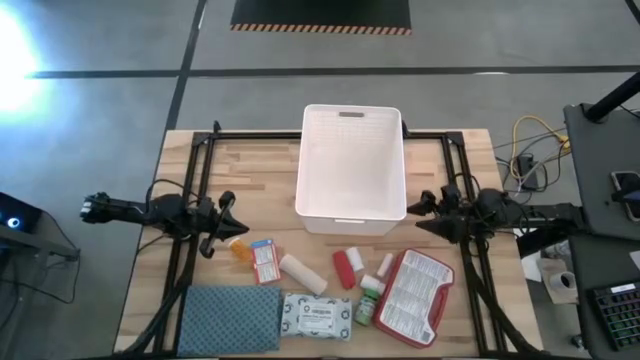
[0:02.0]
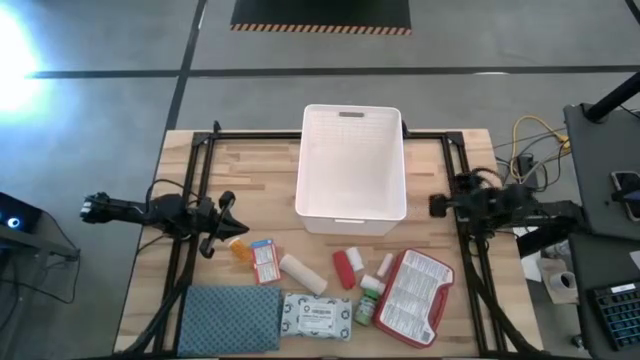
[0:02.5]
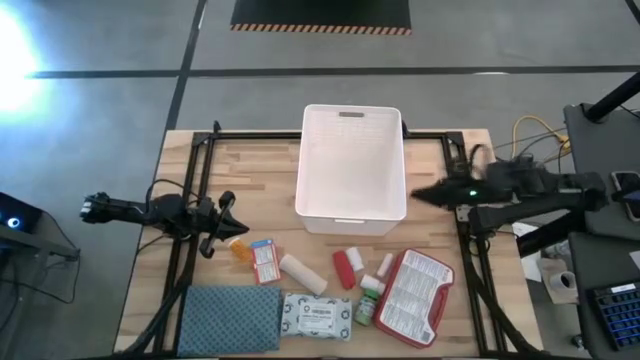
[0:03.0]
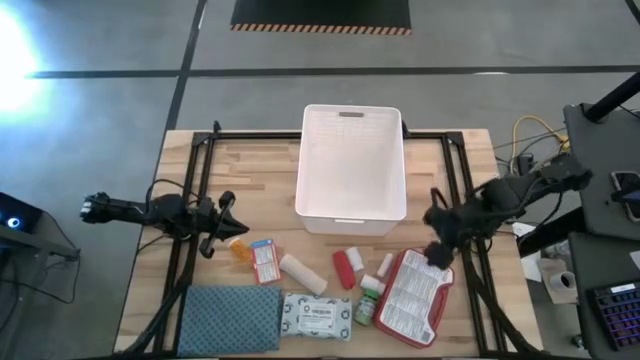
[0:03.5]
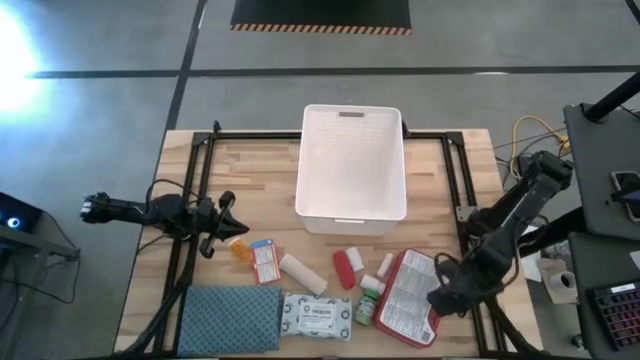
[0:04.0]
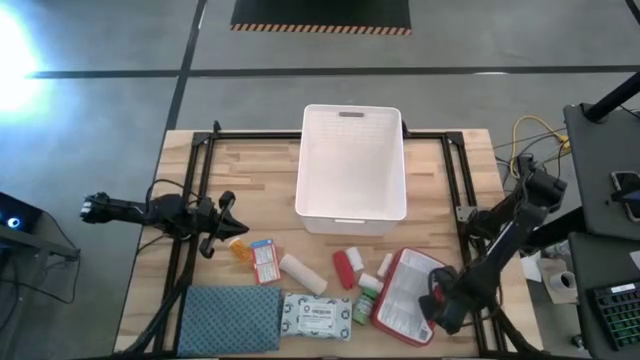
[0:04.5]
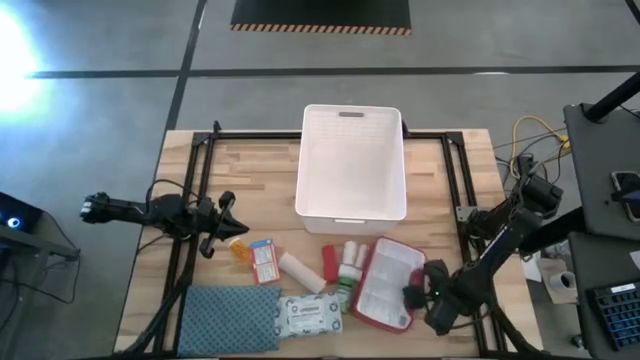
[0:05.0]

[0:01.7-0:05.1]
Task: Pick & place medical supplies in basket/bin
Put the red first aid kit into the white bin

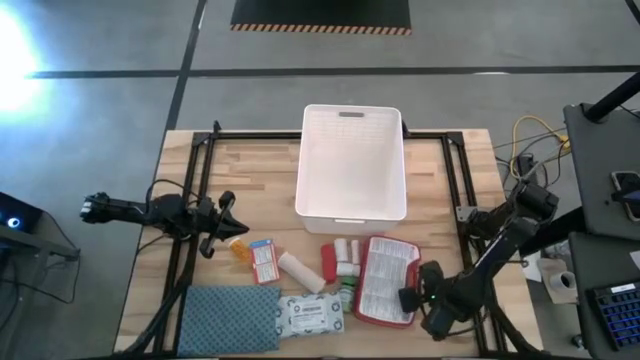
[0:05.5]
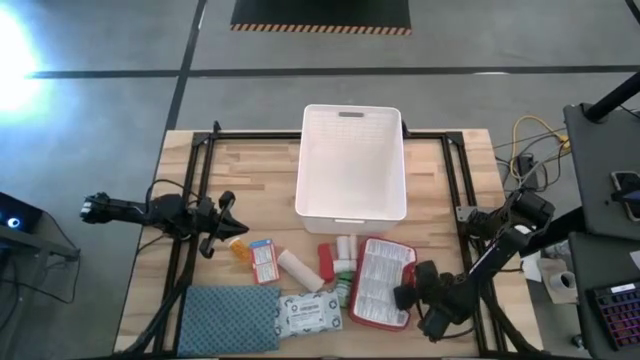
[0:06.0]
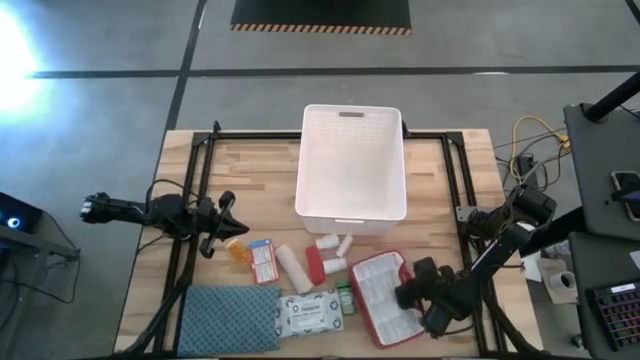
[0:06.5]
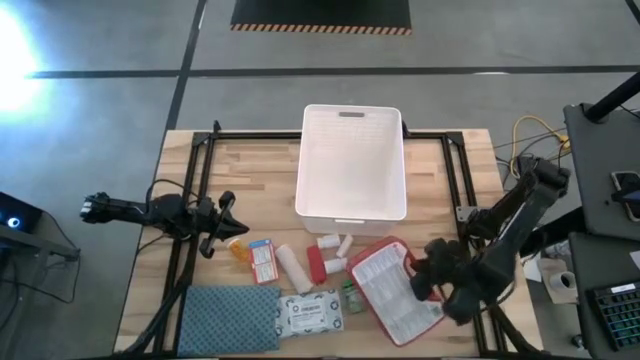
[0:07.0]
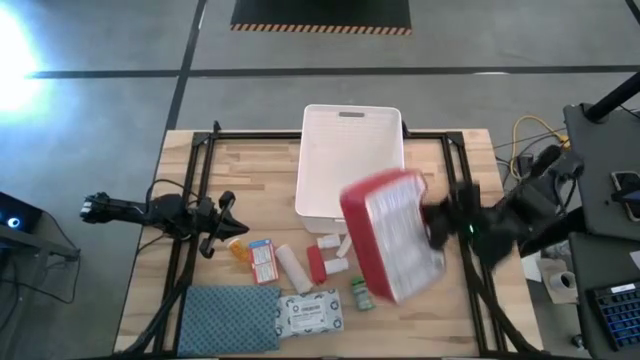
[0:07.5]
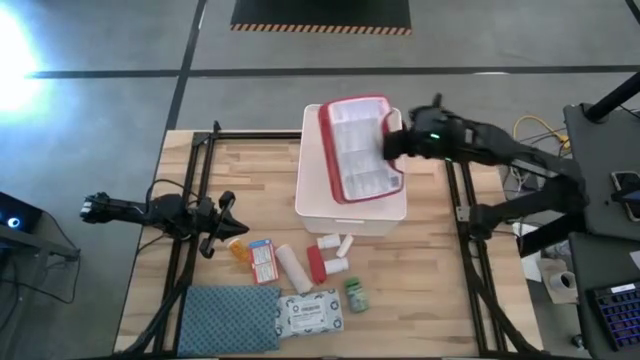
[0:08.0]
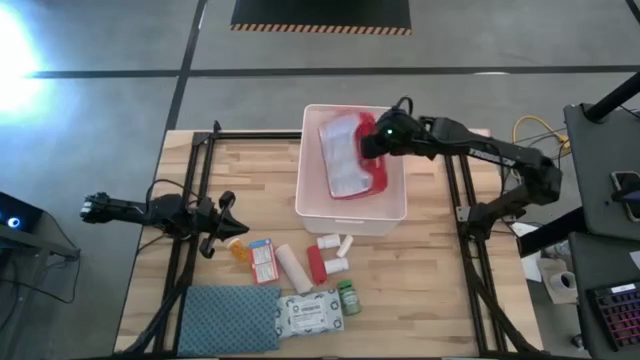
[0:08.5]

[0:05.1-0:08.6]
Put the red first aid kit into the white bin

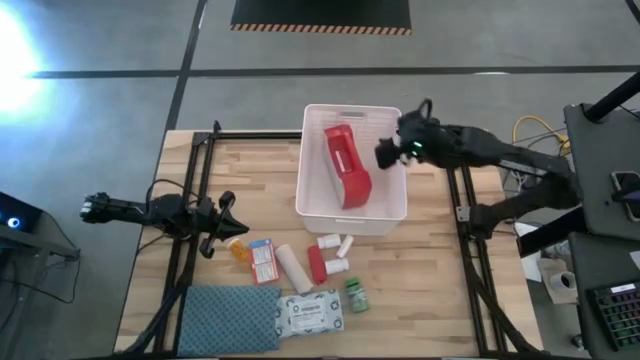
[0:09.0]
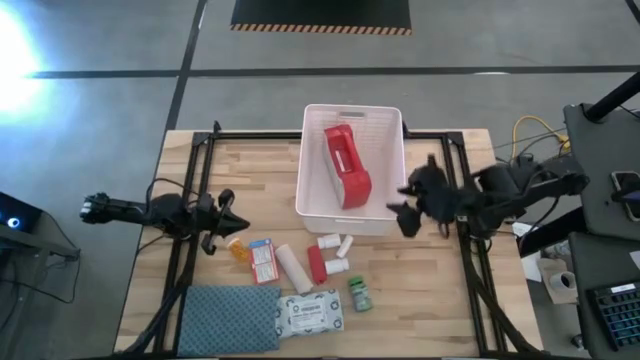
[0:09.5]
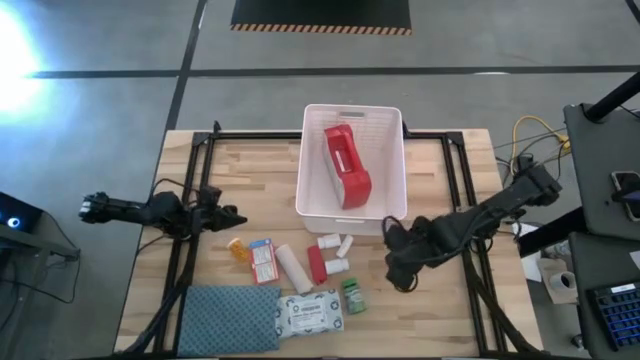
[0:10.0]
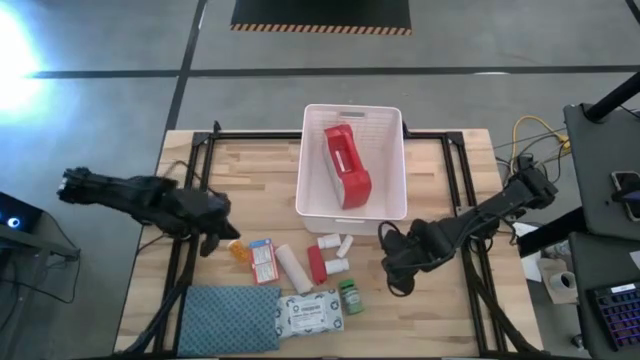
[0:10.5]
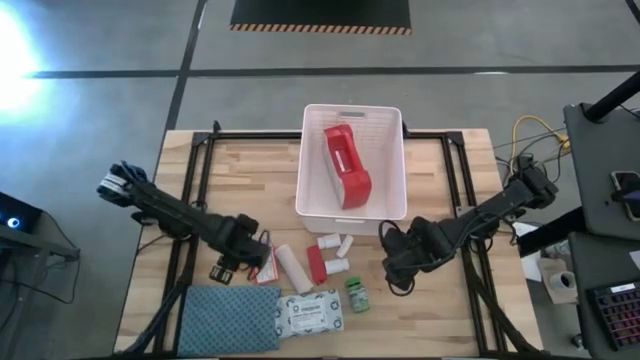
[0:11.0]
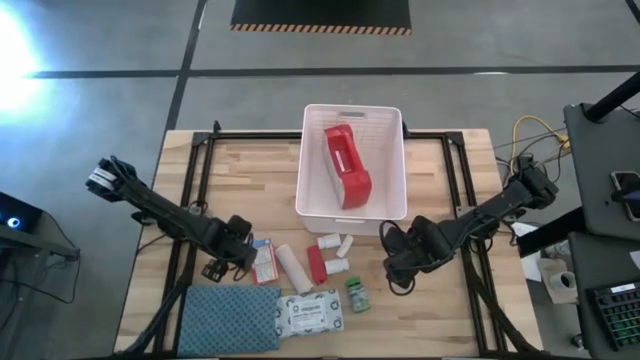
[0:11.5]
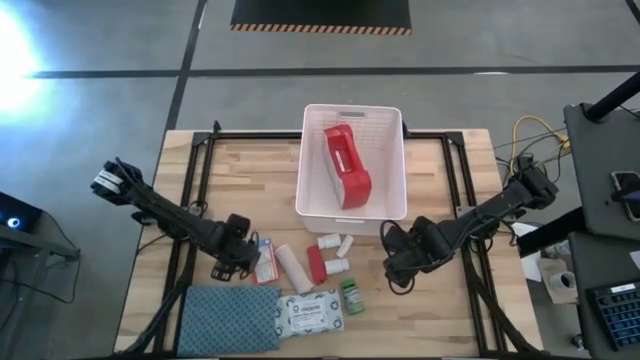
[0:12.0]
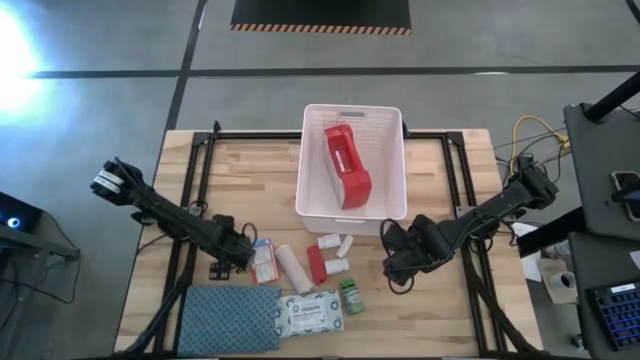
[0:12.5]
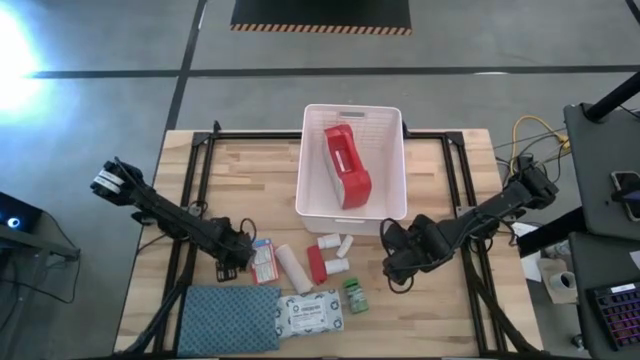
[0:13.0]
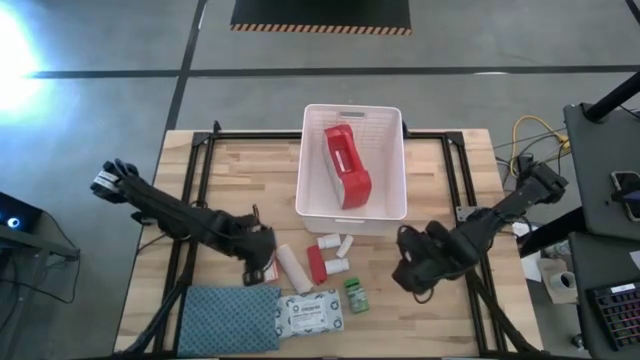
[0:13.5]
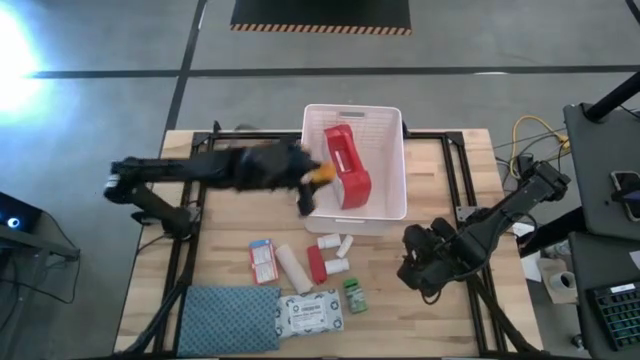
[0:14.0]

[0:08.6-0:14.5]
Put the orange pill bottle into the white bin

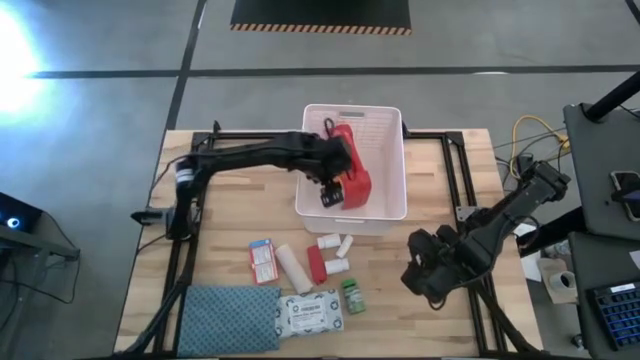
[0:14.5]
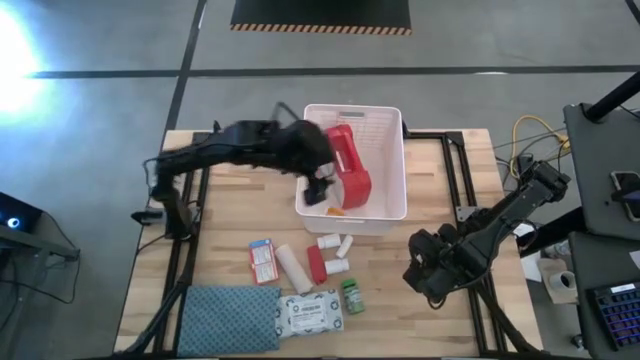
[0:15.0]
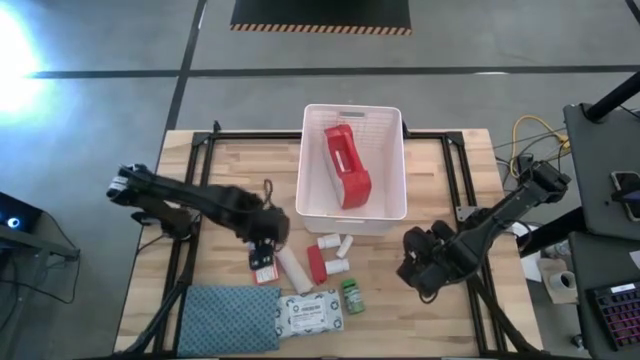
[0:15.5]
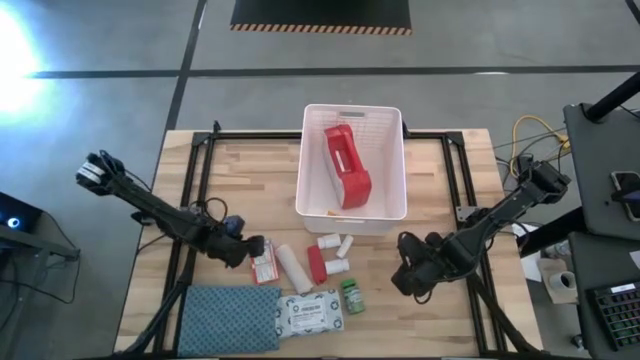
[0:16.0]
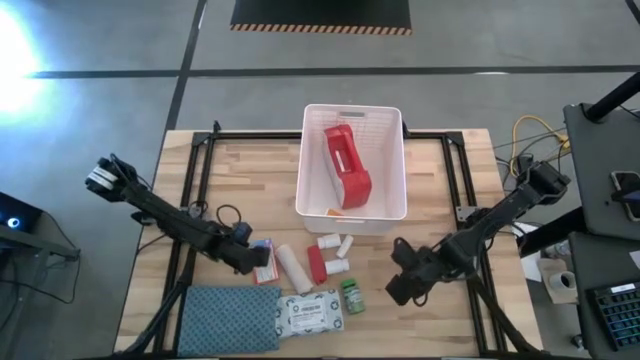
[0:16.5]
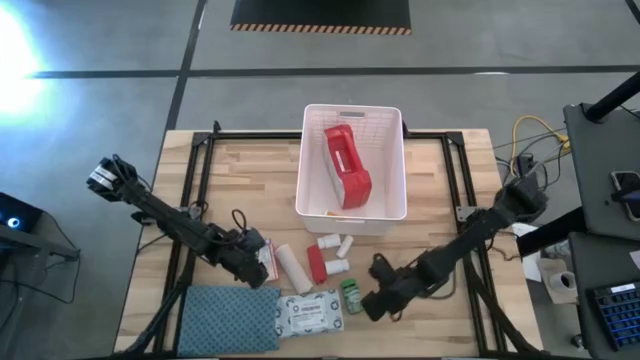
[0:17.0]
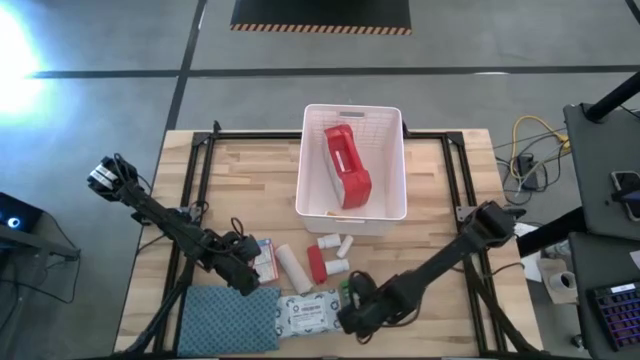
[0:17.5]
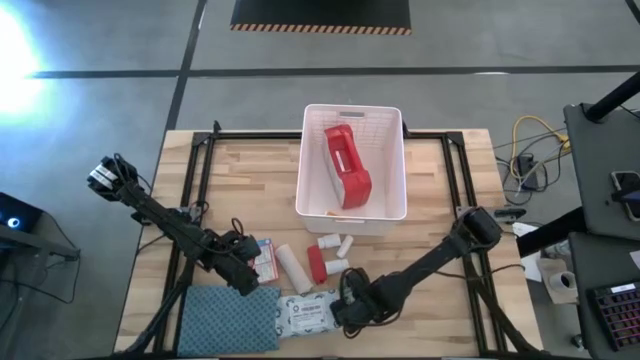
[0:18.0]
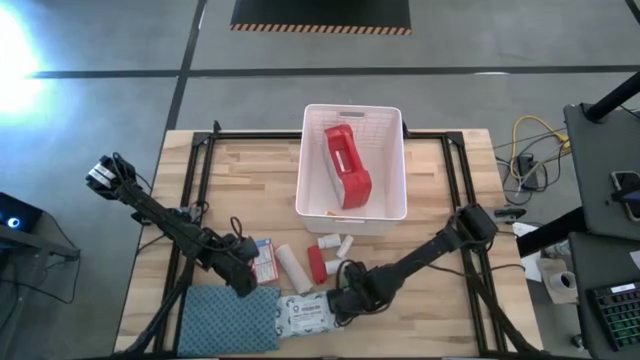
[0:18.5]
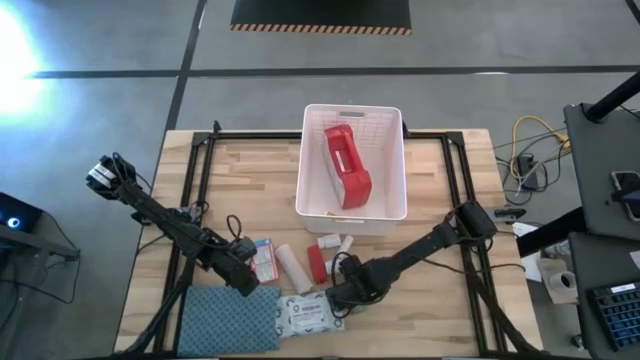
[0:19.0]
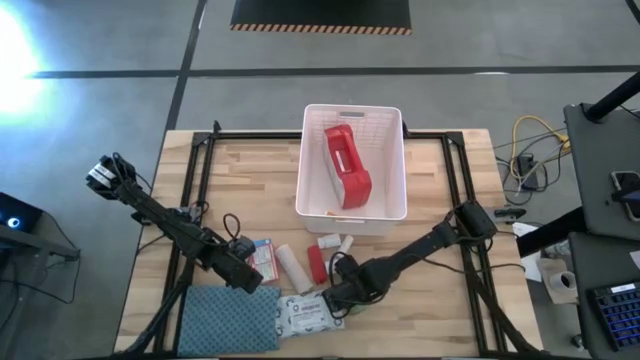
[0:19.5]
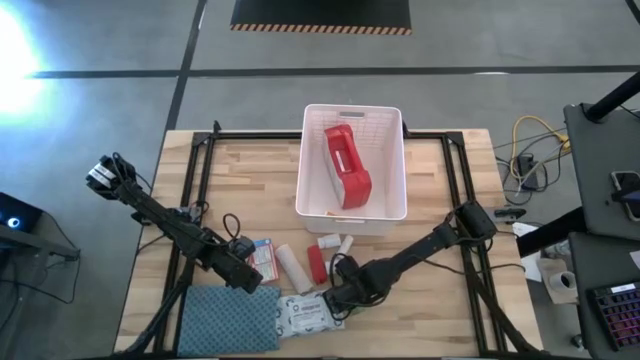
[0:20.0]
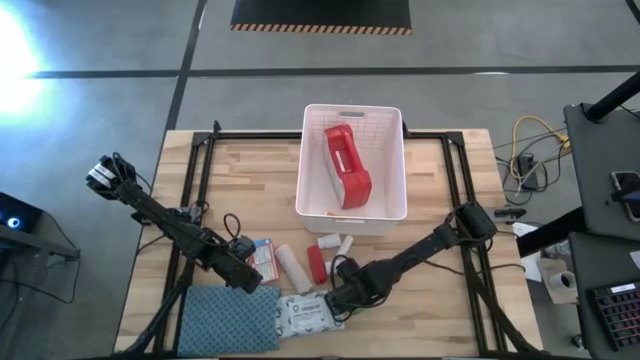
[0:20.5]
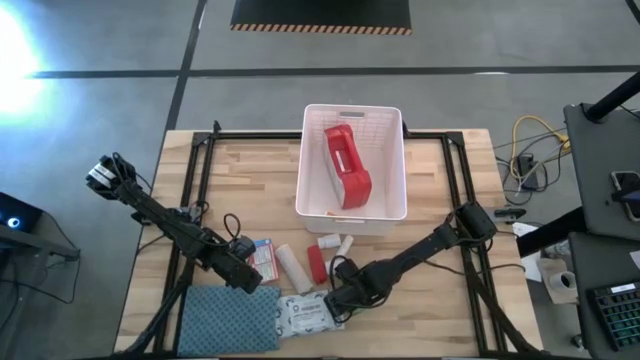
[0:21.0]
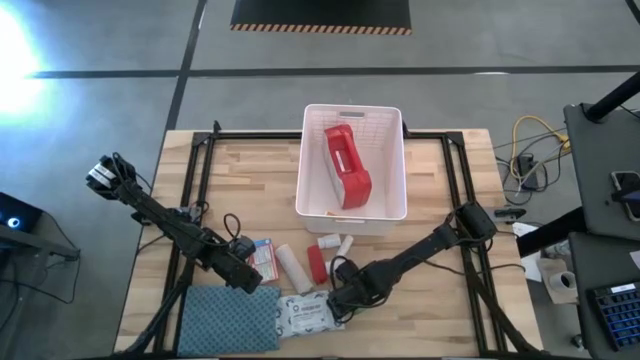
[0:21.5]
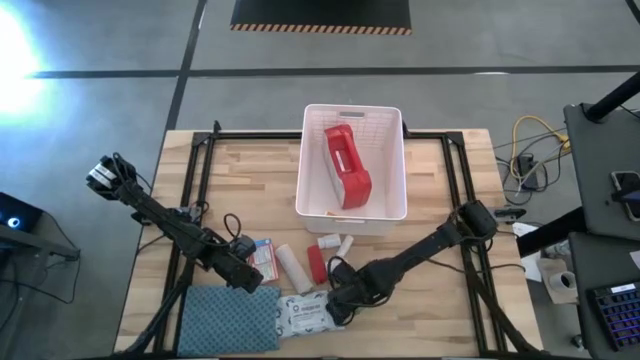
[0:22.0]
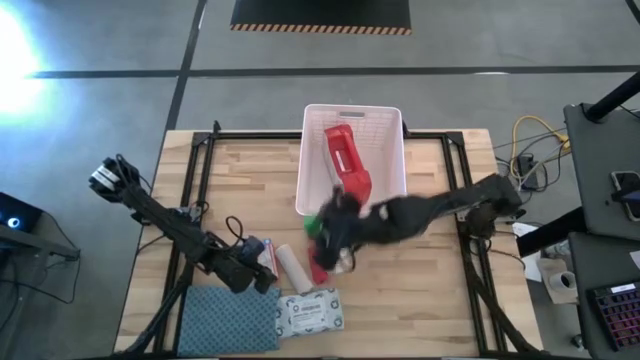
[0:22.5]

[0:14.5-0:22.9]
Put the green pill bottle into the white bin
